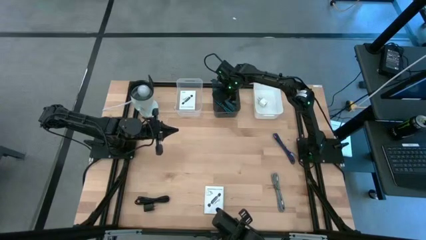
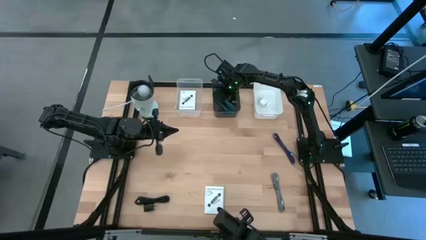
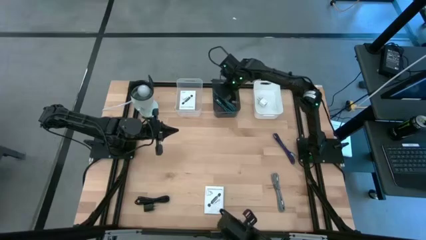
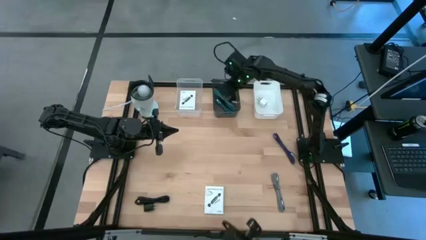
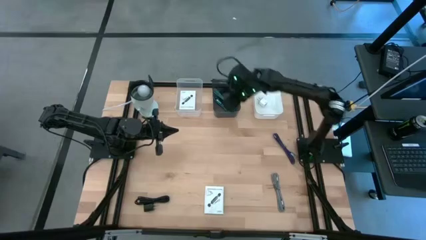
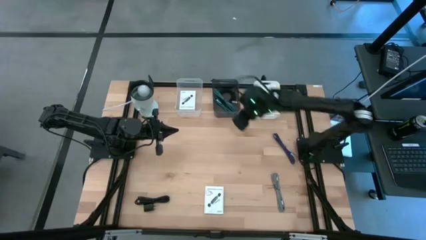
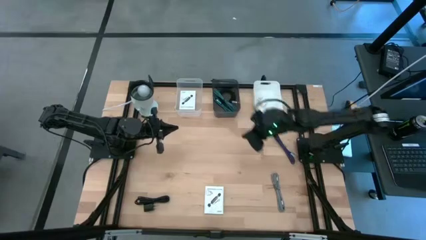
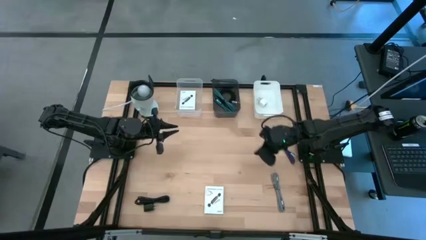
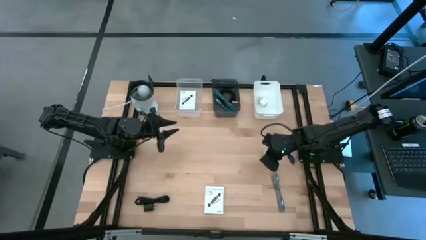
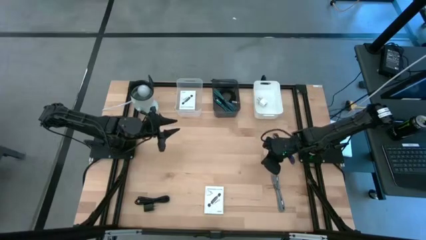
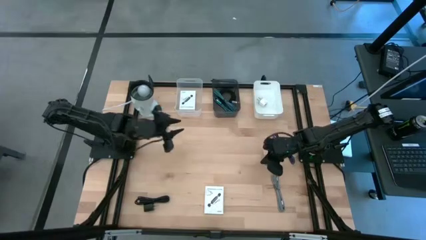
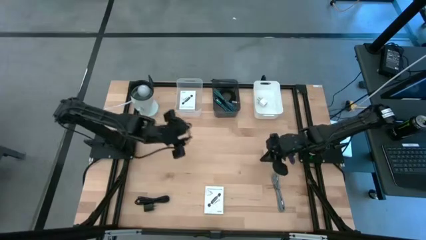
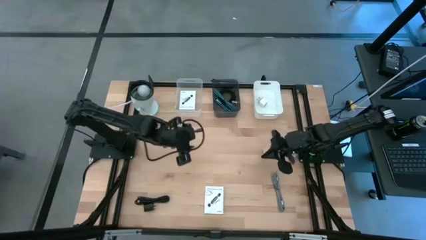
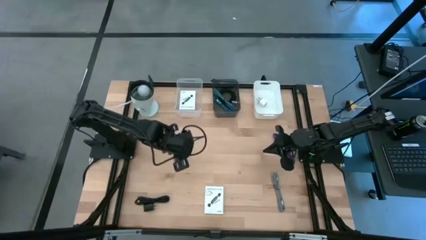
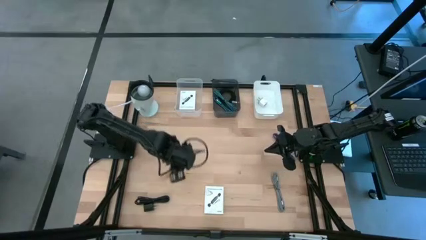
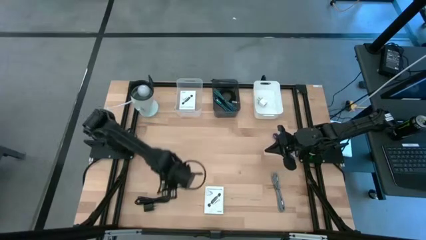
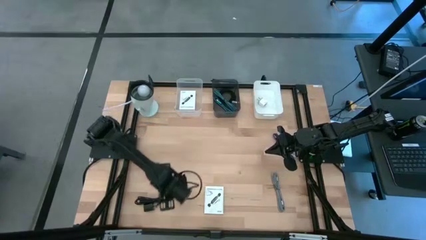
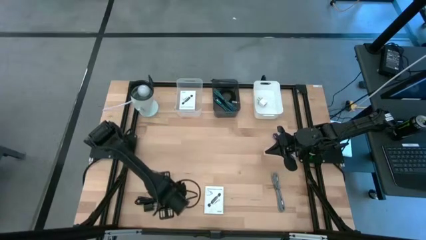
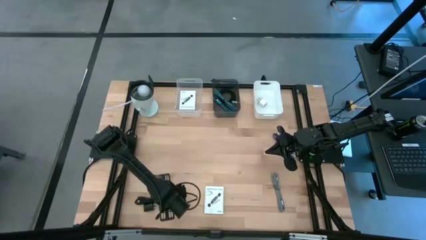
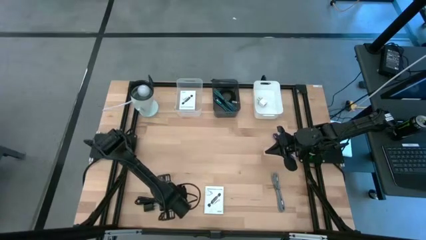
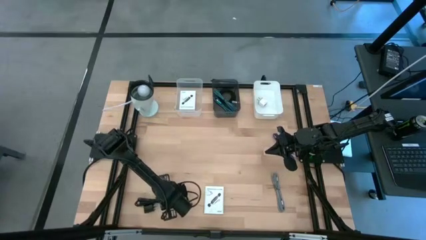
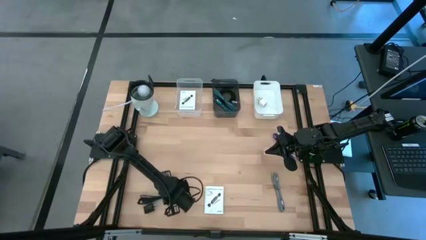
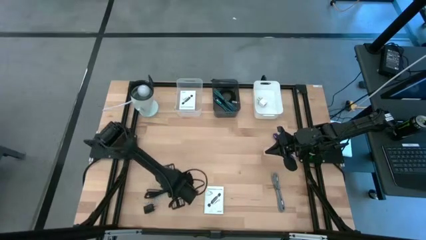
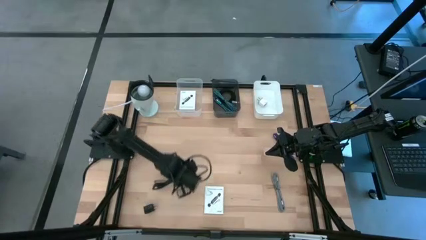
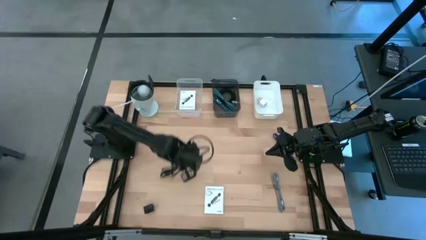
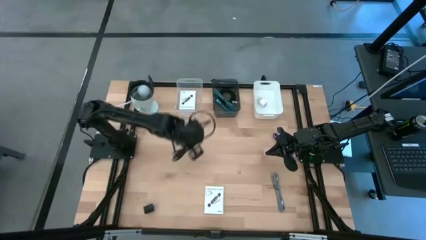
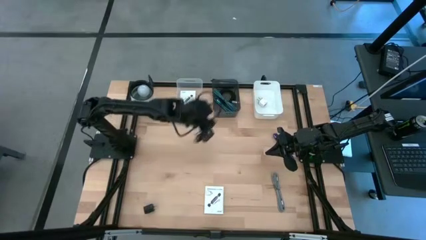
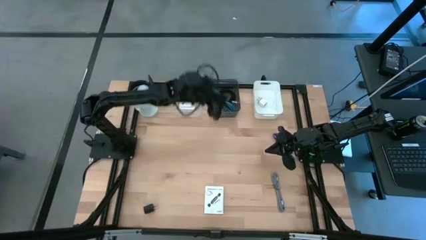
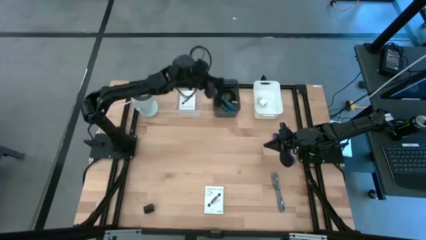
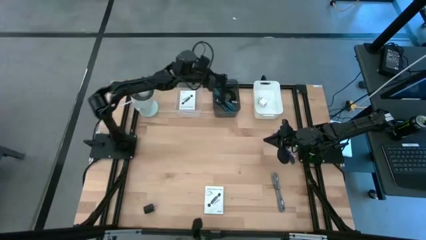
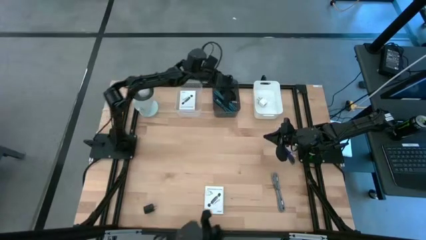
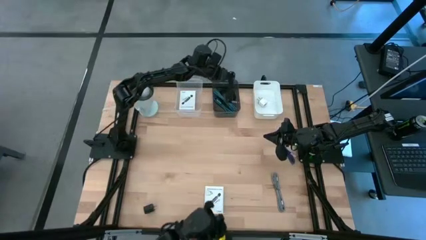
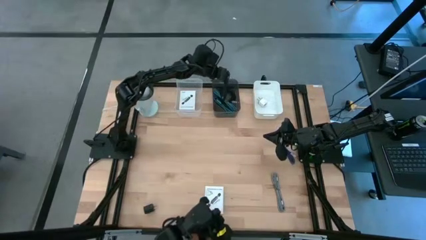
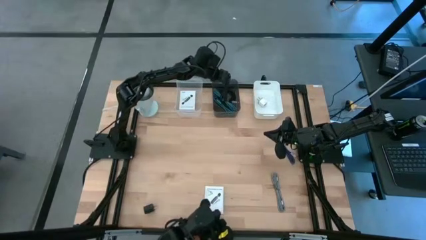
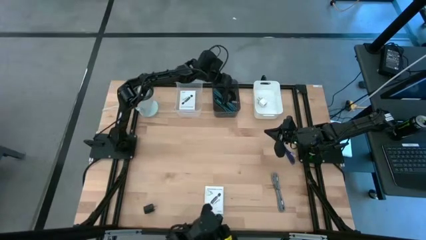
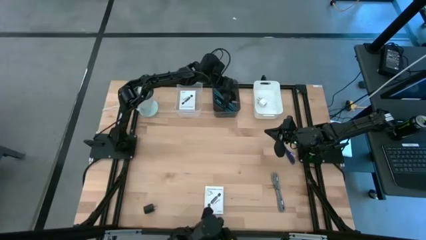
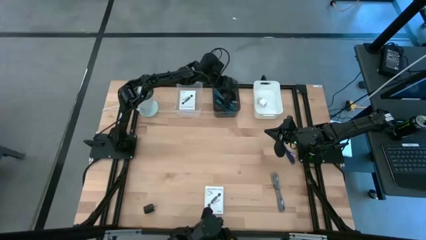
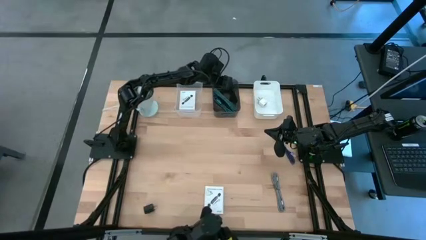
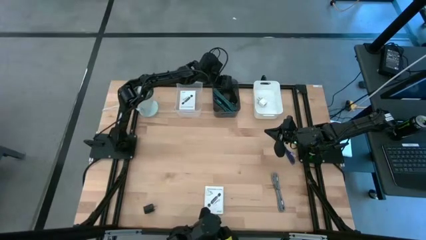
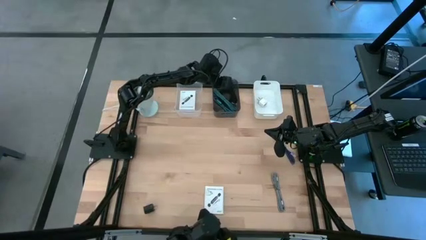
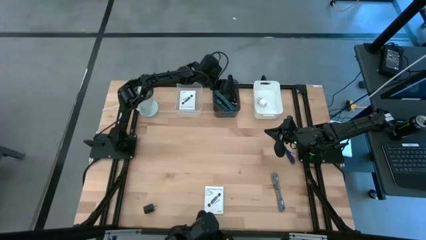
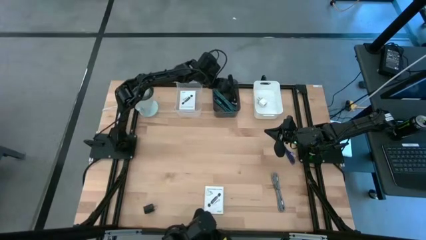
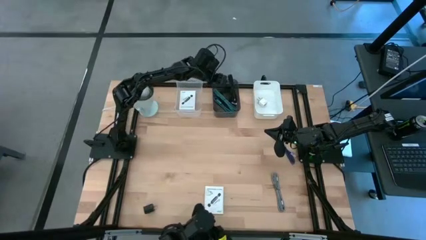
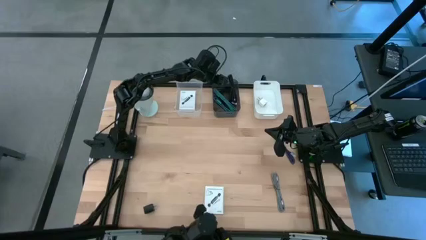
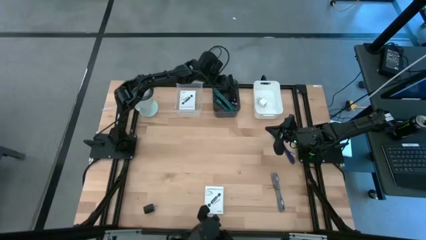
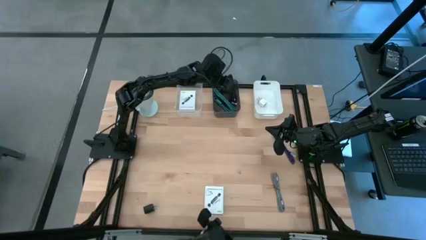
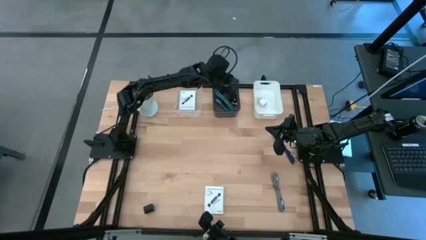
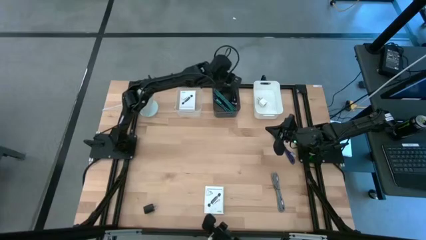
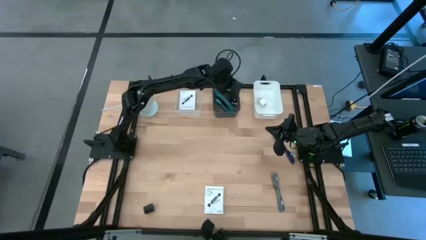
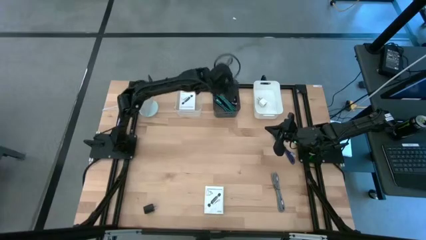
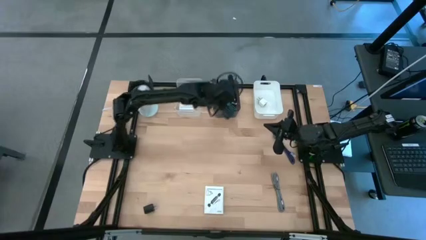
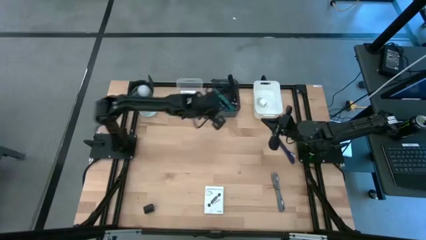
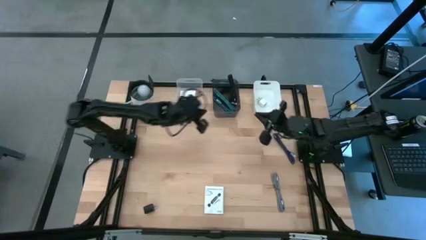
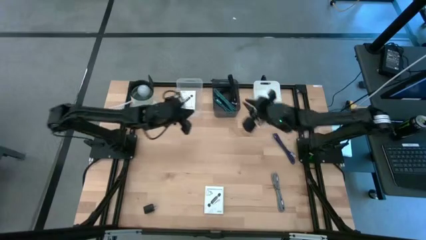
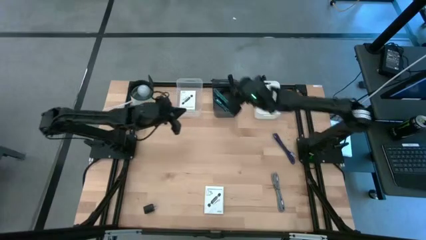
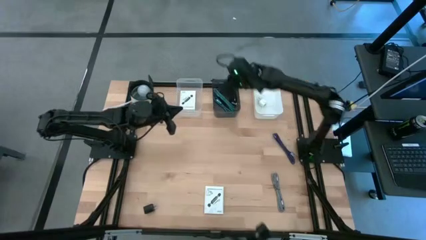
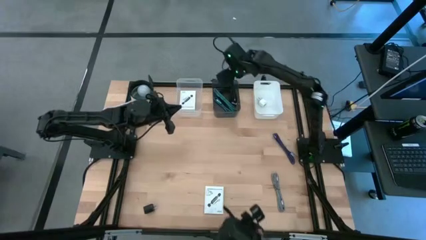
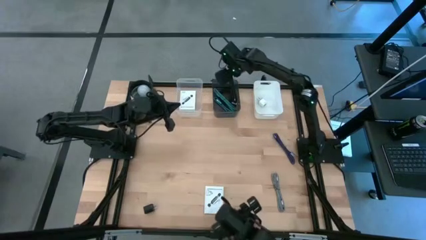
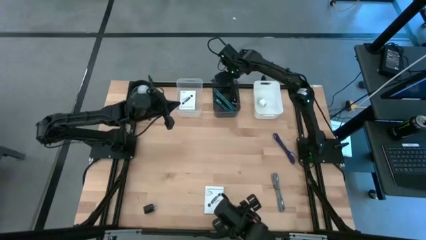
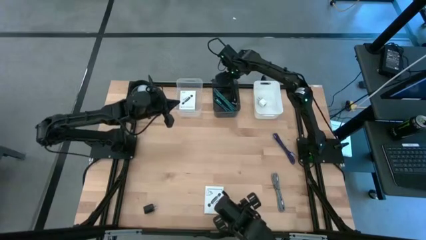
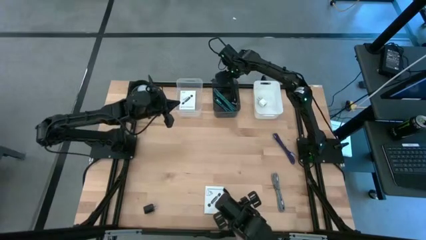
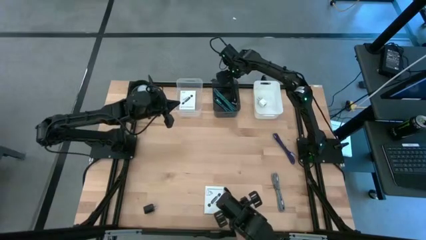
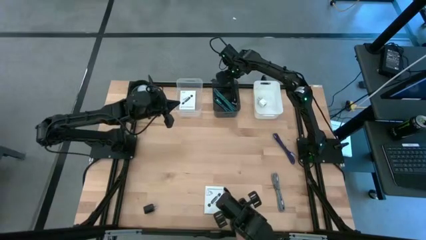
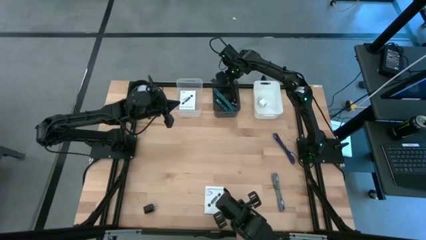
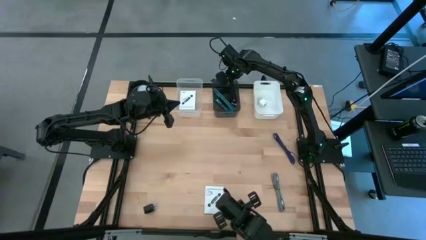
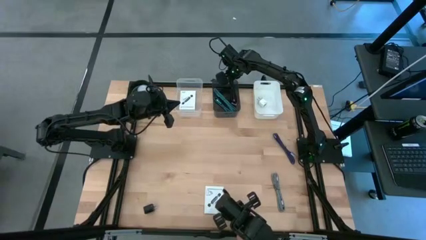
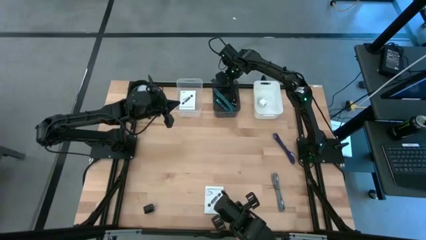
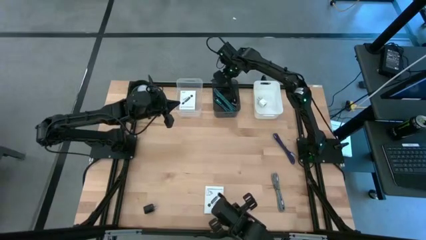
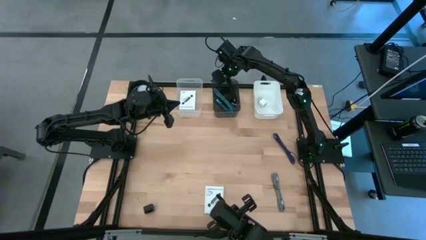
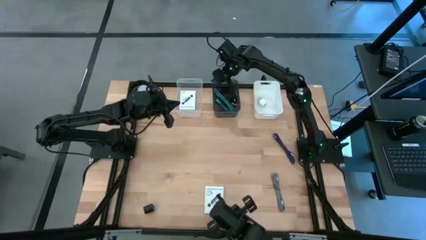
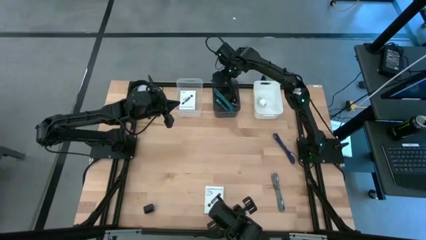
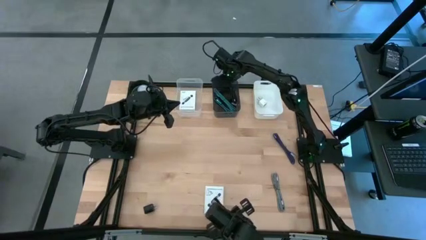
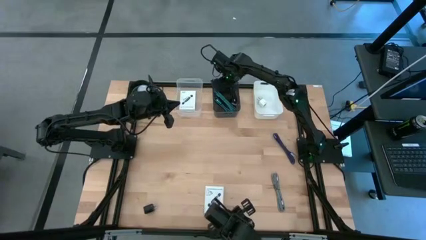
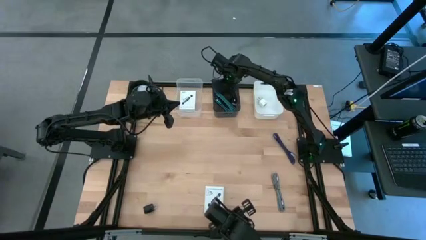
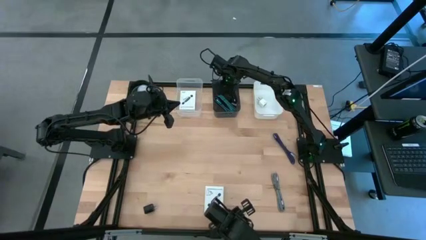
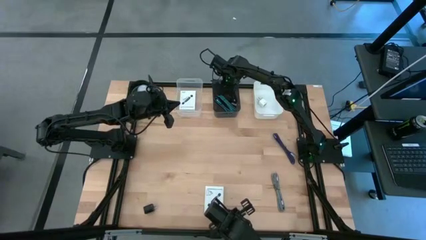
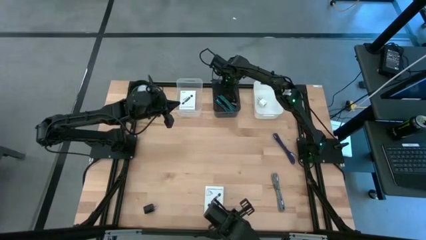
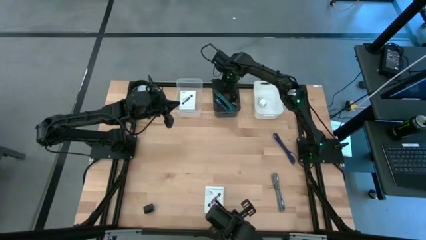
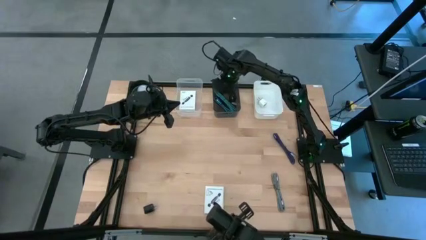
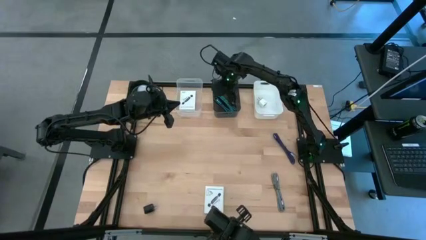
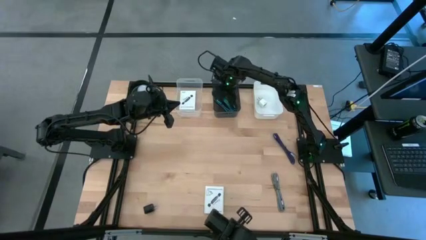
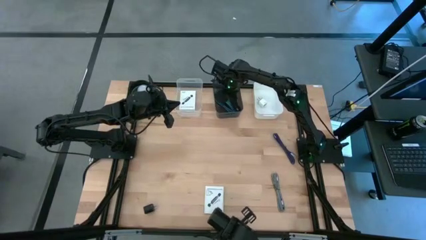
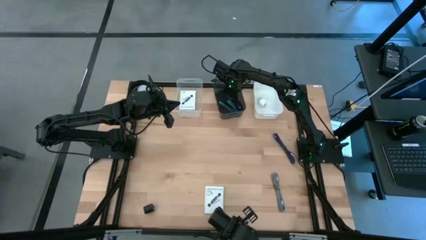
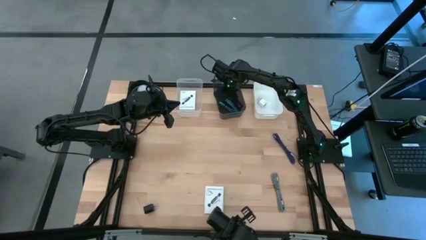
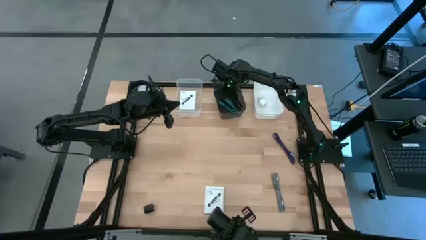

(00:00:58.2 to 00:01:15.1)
Task: Pick and place items into bin
Put the black charger cable into the black bin
